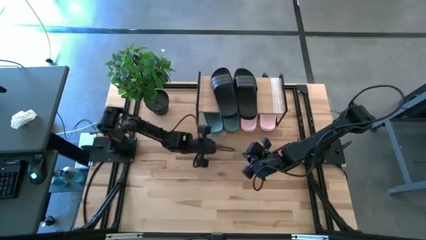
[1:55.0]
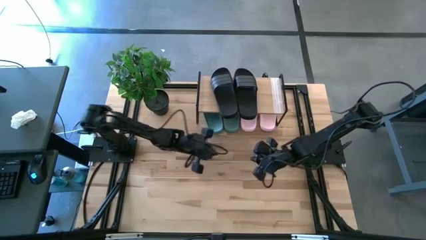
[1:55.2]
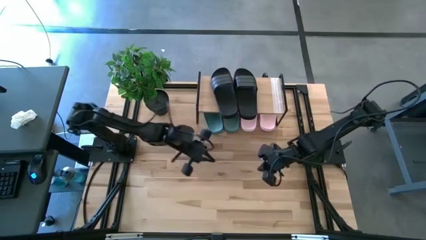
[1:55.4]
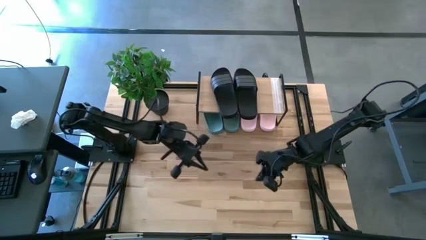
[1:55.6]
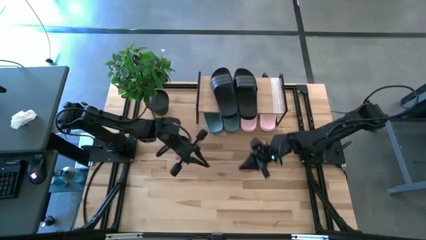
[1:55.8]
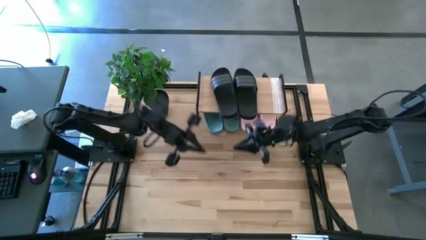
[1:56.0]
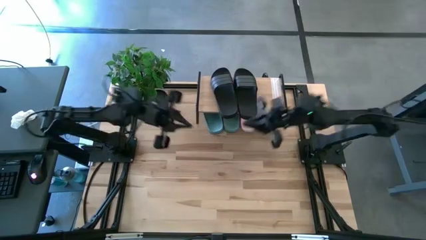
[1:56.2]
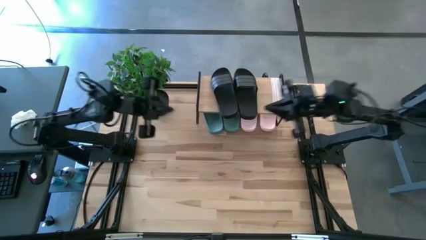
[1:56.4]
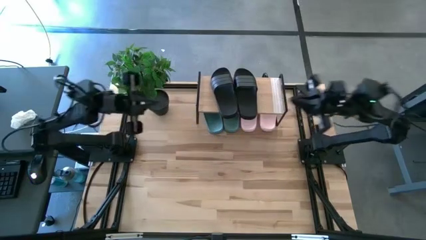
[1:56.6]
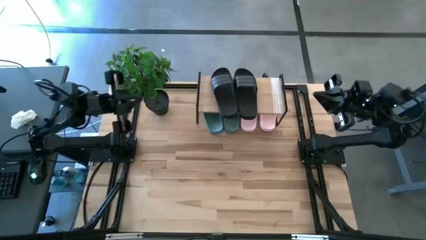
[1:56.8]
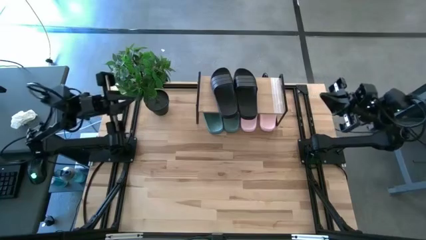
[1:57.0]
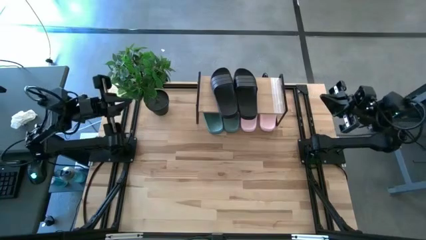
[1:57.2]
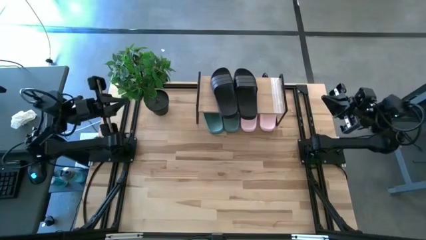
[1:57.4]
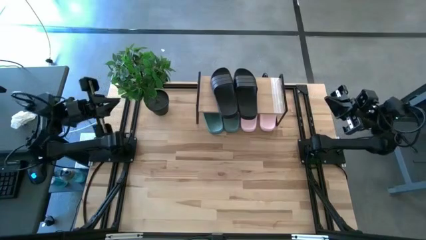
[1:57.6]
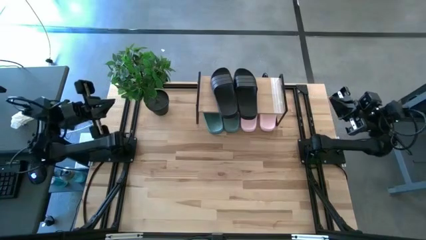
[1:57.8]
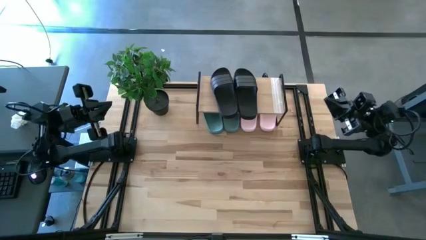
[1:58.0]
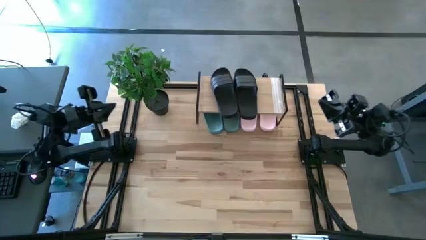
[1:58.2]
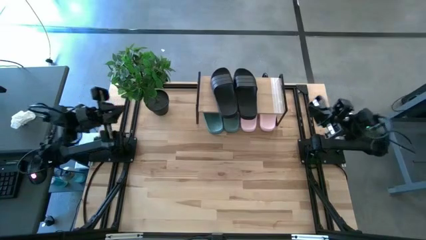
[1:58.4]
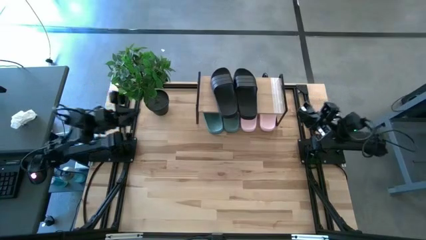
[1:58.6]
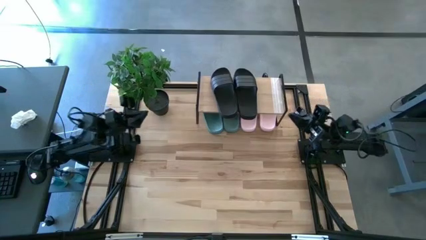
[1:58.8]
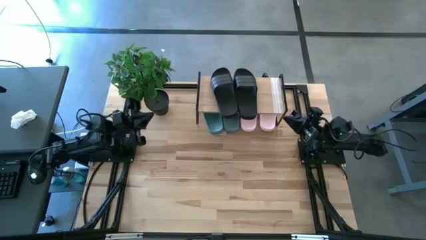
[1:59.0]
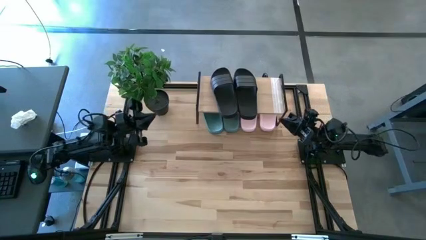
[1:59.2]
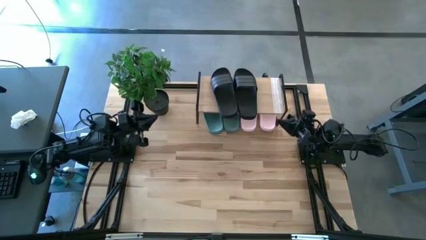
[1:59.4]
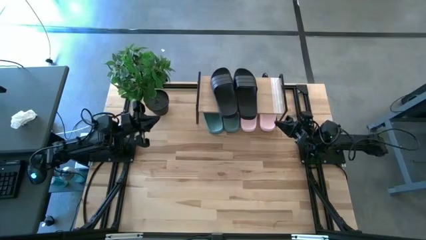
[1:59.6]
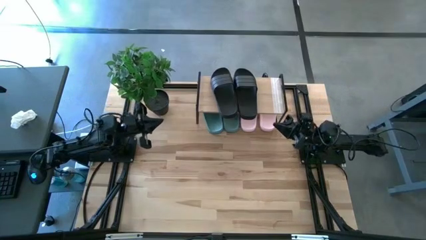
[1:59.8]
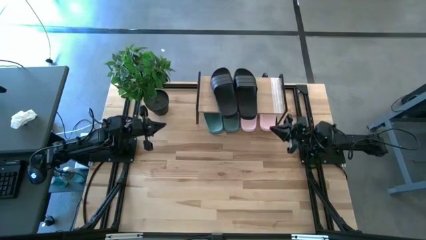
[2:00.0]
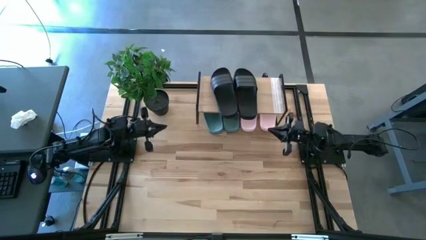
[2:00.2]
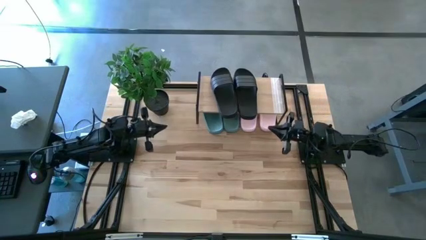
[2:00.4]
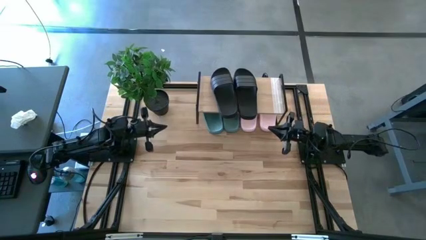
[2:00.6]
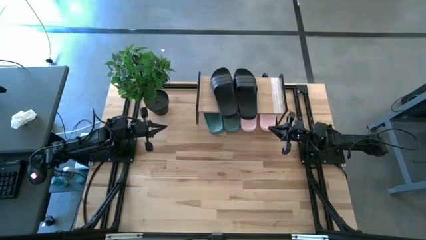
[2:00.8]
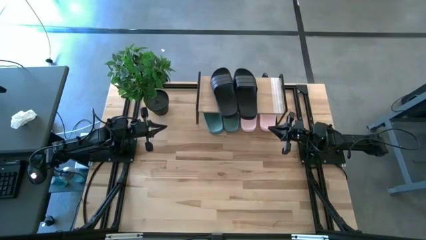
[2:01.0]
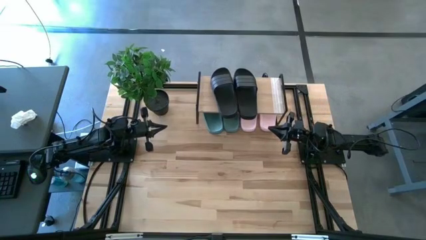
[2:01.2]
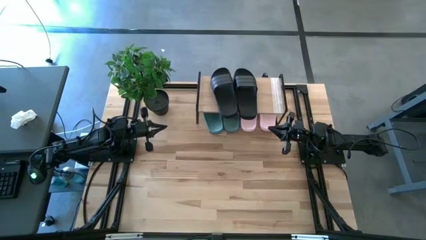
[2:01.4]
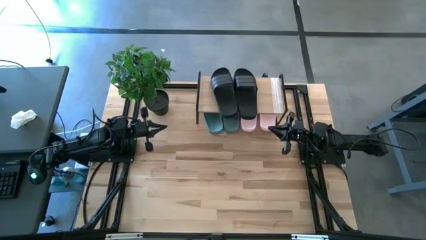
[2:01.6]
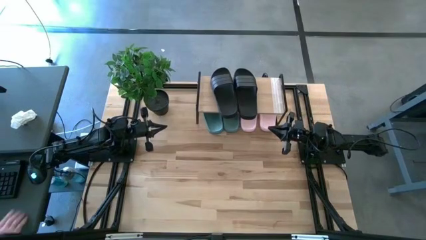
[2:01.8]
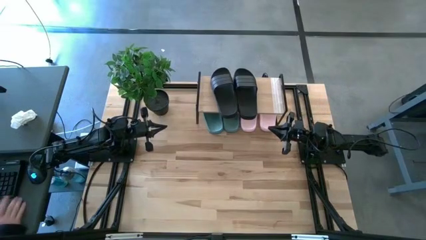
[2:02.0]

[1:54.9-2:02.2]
Task: Pick and place slides into the shelf
Return to Home Position

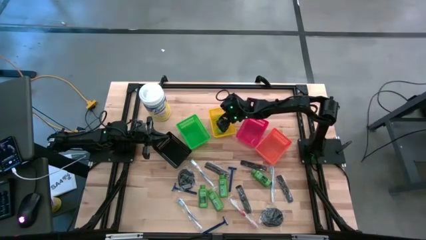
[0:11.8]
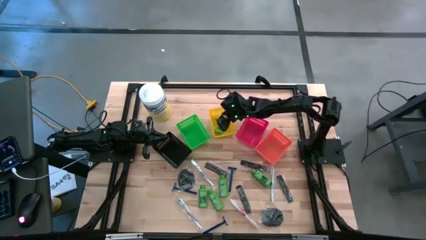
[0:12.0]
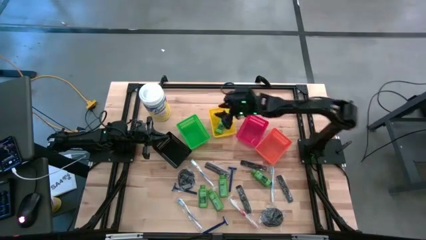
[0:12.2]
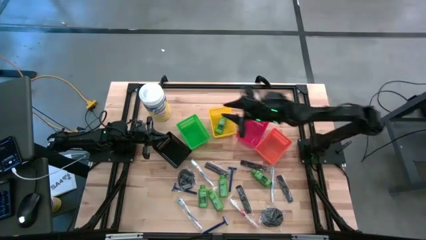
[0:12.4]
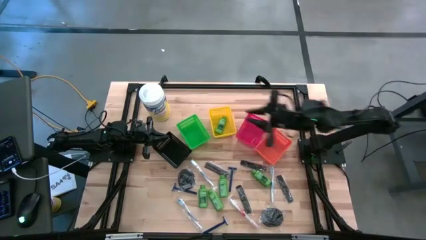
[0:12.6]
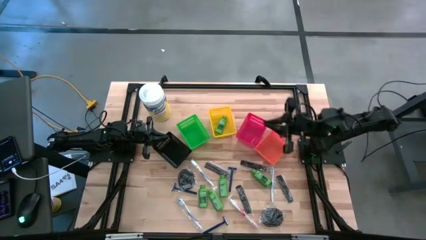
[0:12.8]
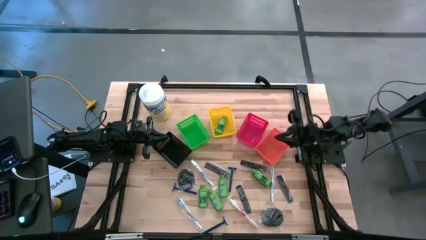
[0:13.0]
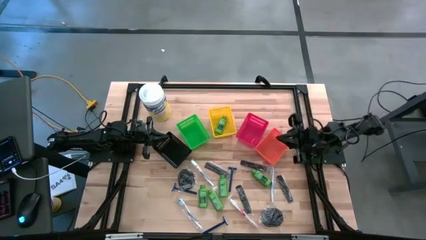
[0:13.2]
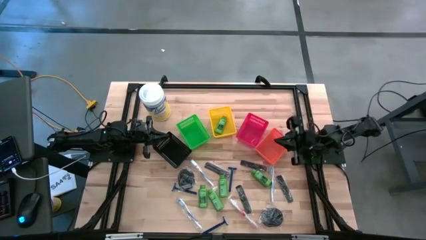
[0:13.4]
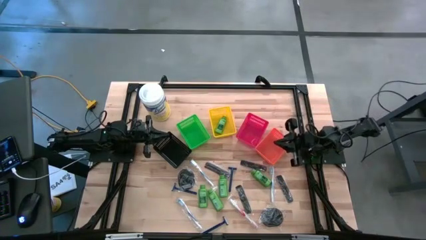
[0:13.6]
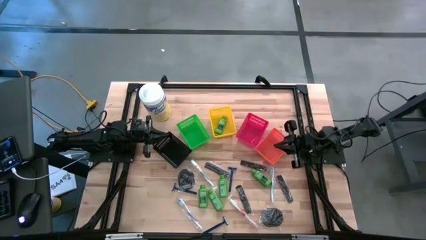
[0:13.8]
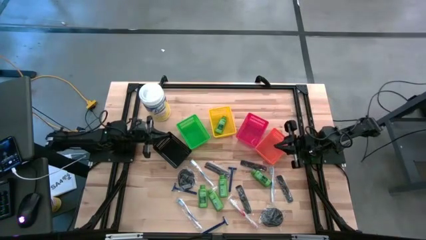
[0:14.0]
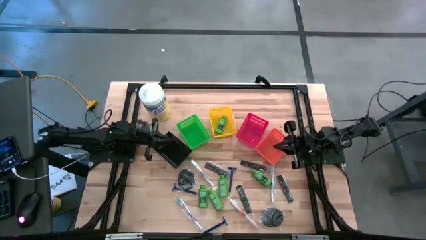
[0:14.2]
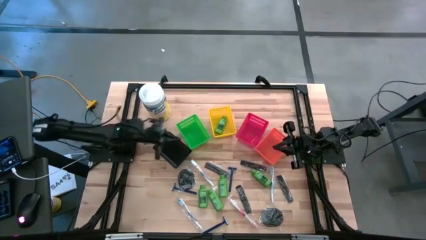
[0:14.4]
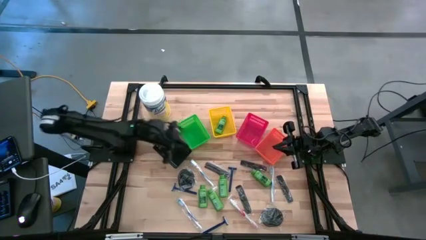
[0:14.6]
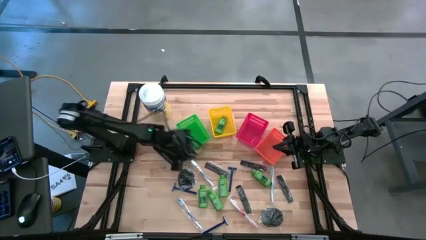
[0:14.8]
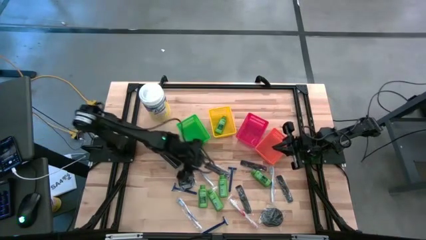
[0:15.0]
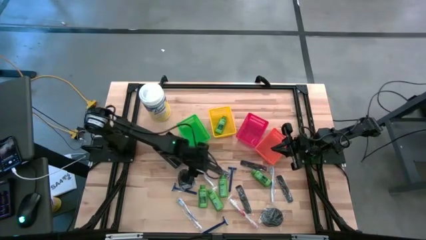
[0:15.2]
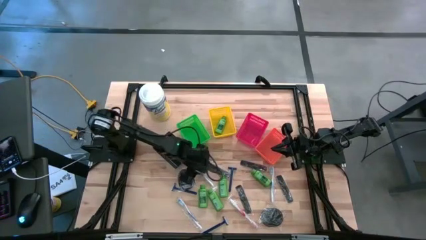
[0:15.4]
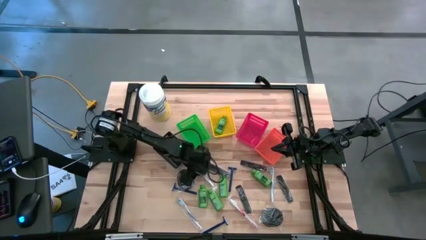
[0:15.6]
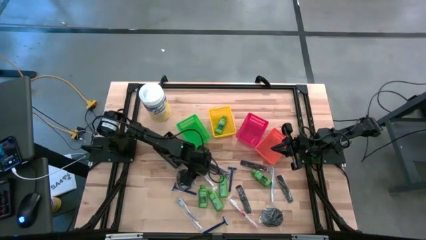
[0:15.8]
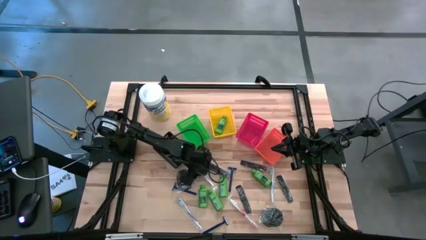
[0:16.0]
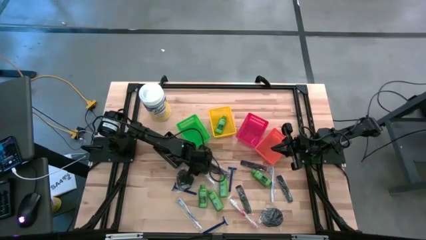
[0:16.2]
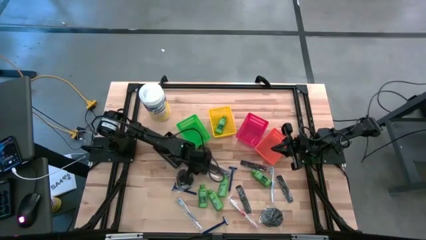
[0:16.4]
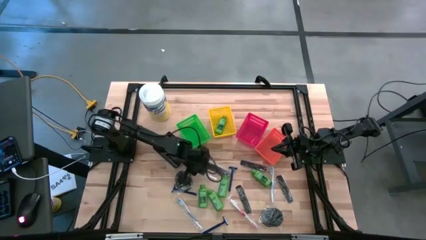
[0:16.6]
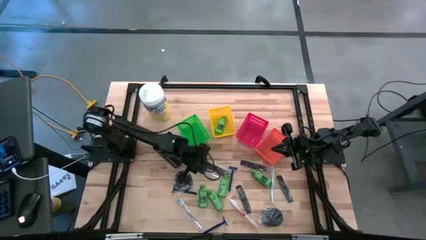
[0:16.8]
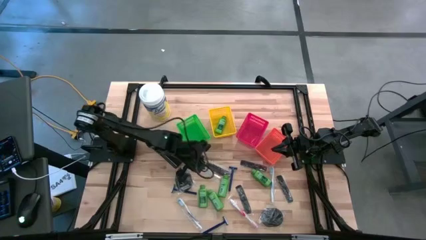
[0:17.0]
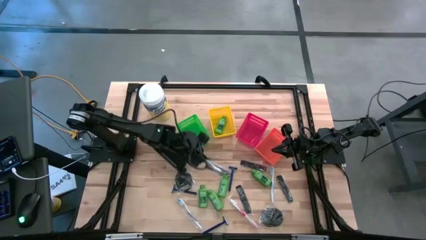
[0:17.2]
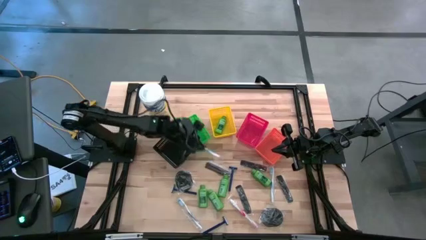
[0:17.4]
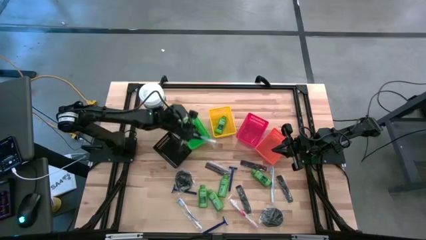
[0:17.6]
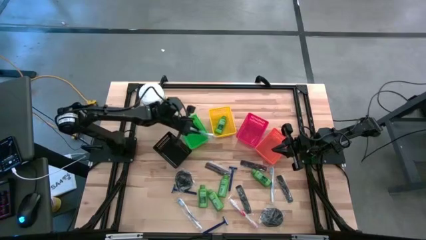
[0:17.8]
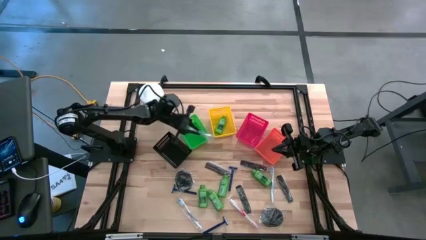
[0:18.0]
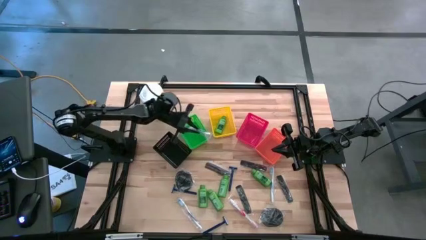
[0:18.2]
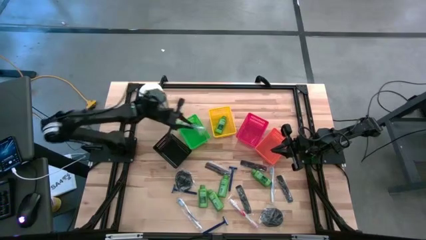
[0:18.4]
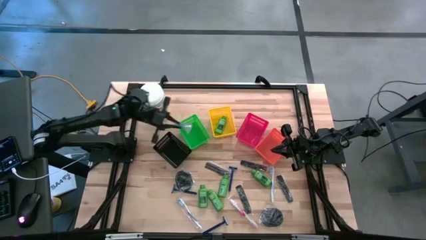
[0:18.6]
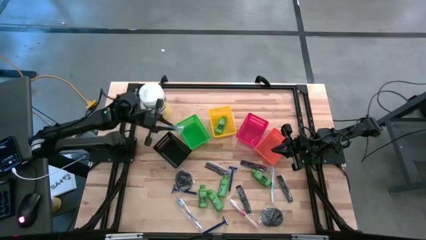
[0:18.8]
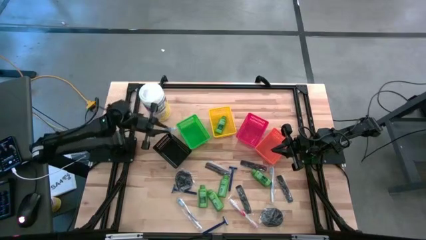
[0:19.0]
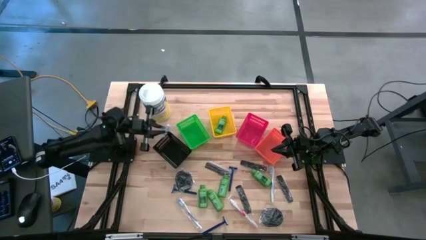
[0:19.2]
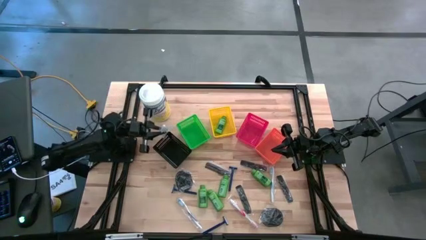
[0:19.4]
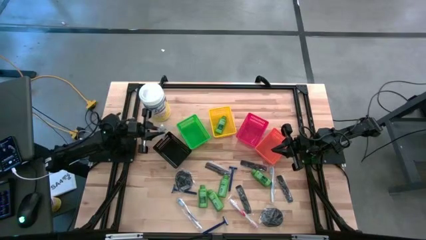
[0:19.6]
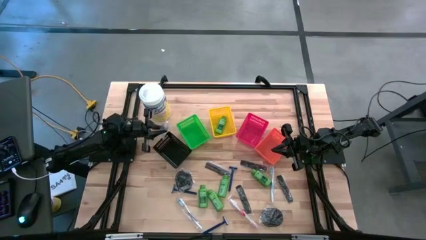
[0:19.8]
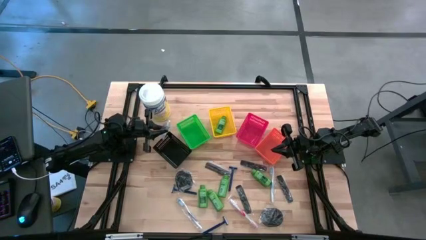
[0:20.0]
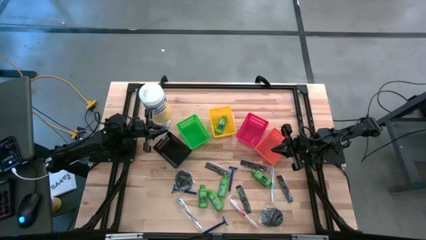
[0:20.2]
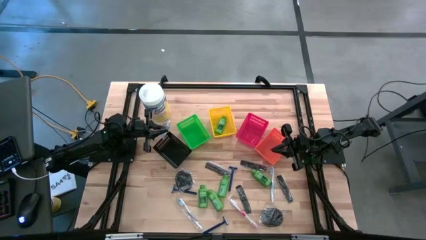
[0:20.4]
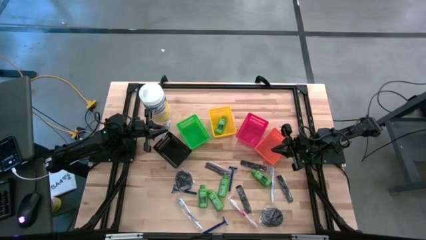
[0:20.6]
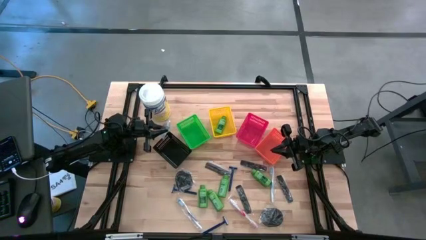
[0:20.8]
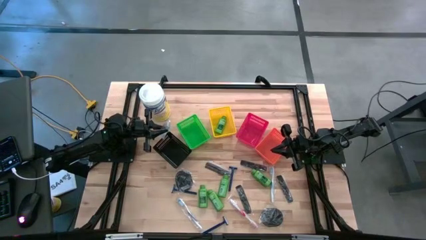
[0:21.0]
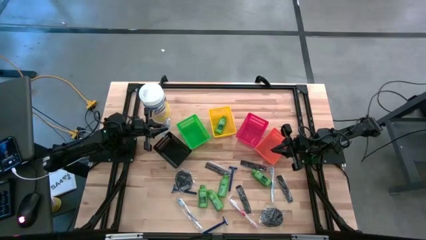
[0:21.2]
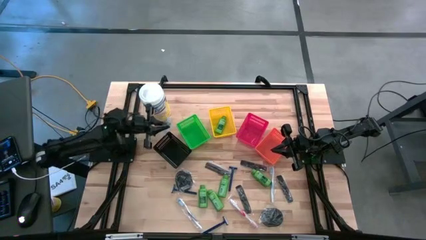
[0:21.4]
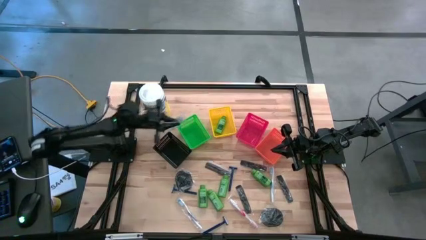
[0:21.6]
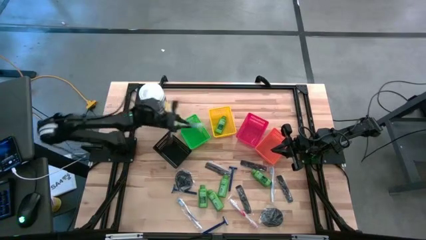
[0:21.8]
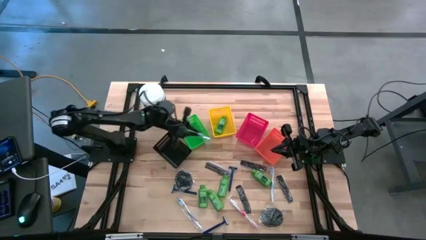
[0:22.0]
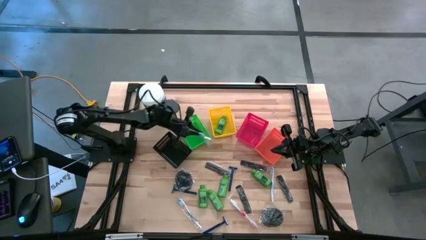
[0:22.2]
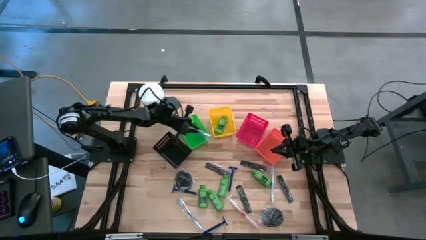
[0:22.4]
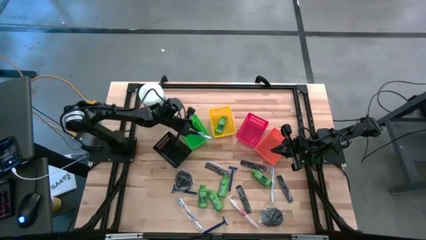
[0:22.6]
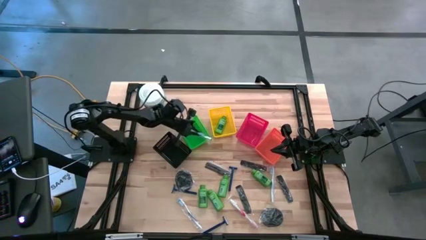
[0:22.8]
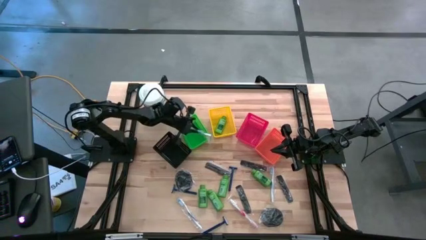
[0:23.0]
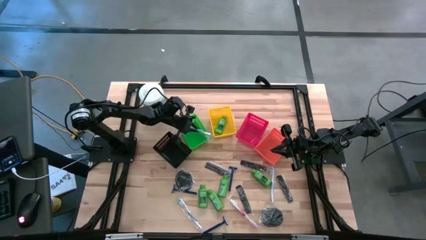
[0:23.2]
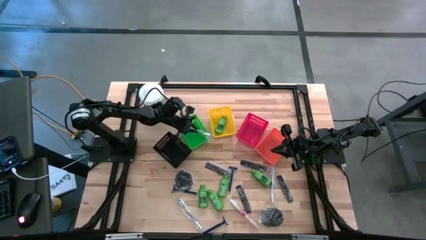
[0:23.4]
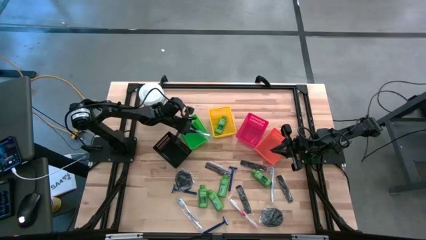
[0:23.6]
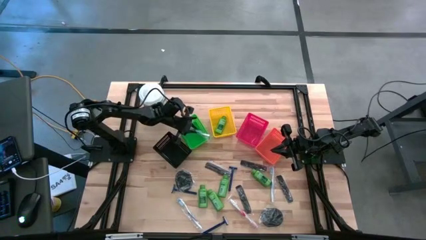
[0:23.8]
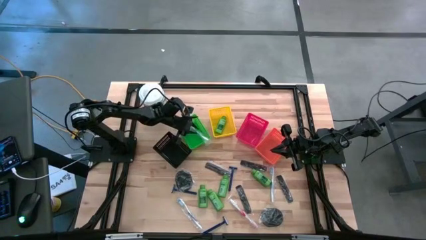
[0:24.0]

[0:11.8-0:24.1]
Task: Pick & Place Travel size toiletries
Put the blue toothbrush into the green bin
